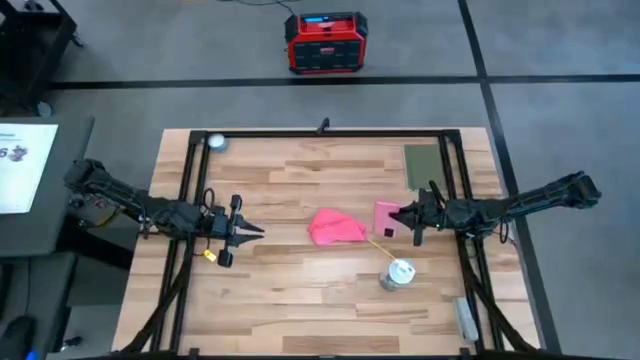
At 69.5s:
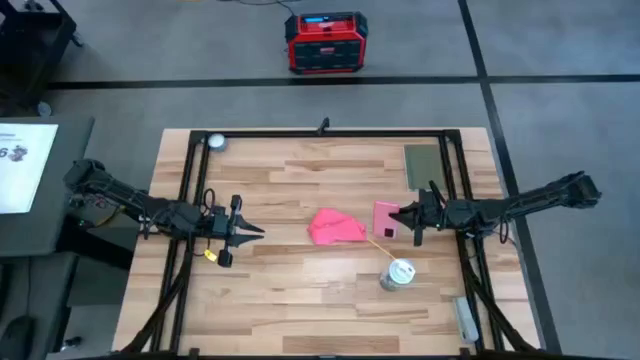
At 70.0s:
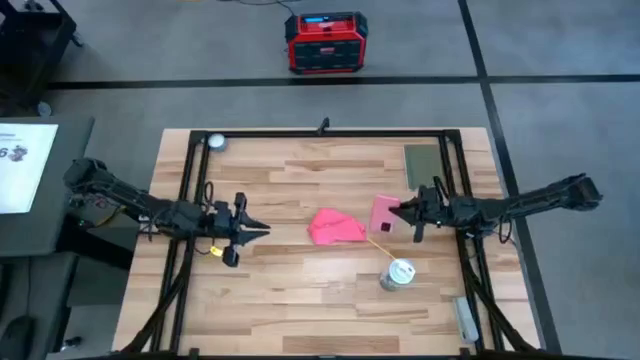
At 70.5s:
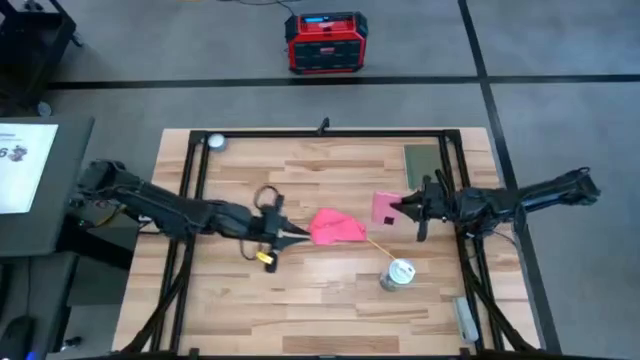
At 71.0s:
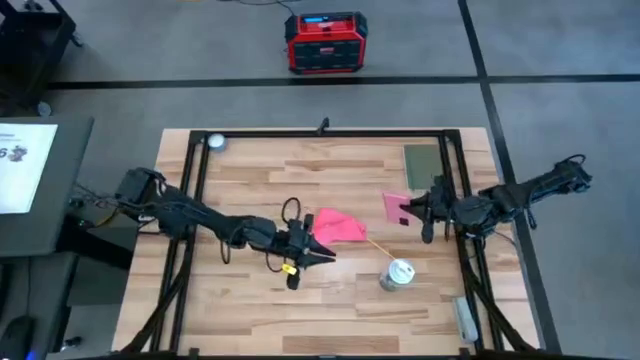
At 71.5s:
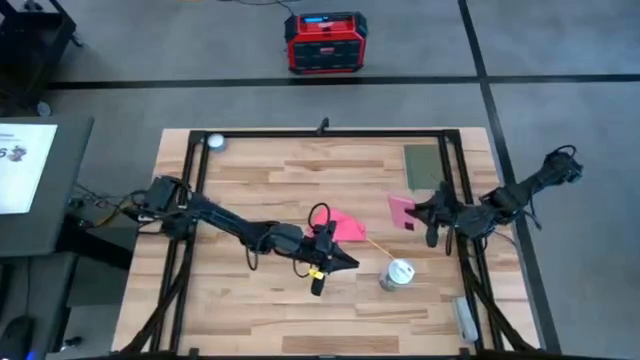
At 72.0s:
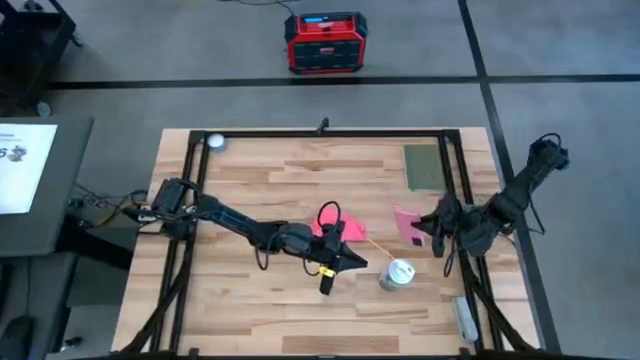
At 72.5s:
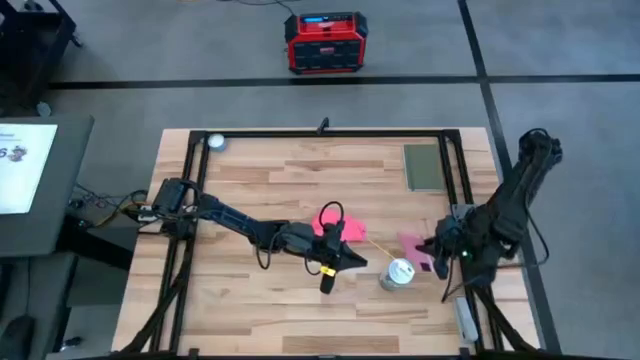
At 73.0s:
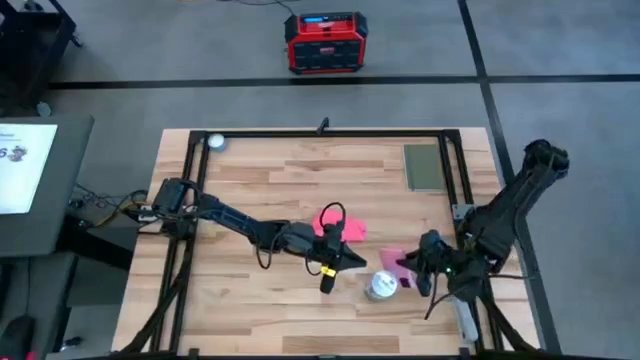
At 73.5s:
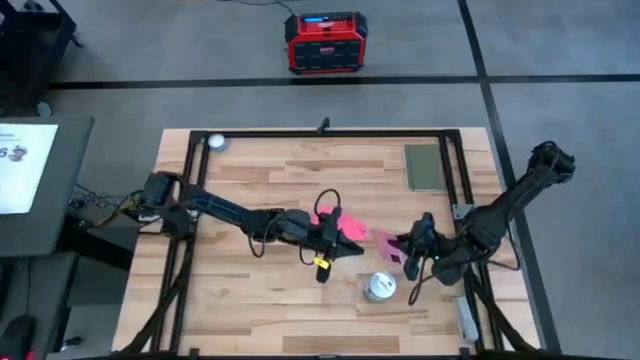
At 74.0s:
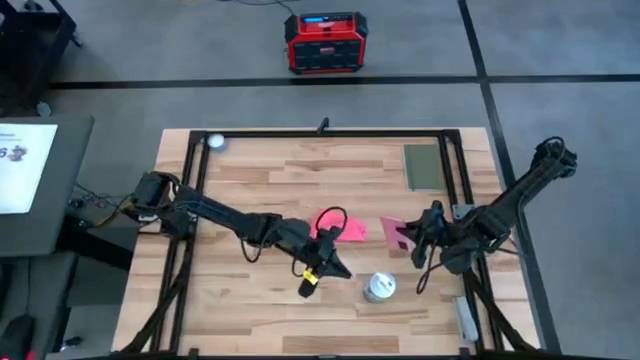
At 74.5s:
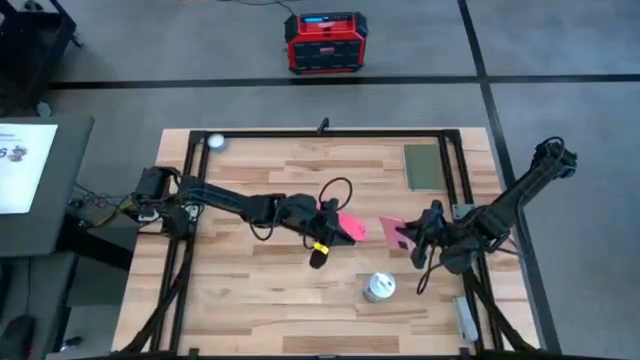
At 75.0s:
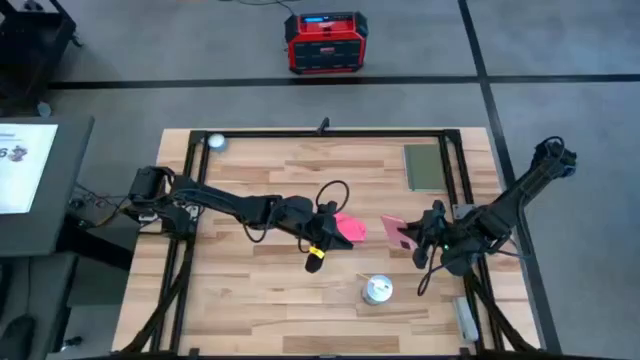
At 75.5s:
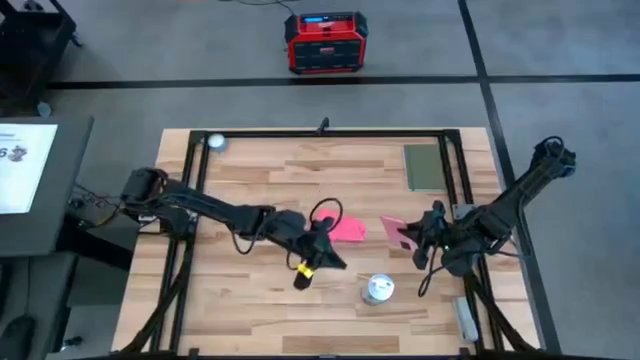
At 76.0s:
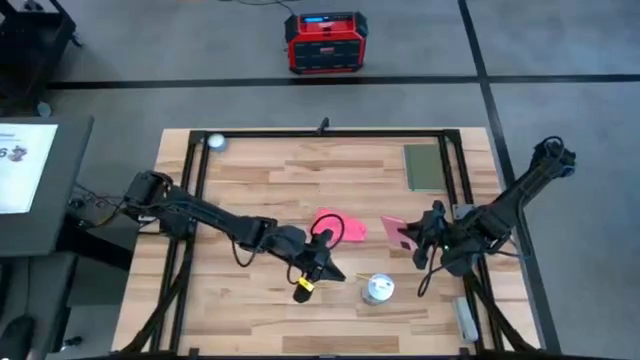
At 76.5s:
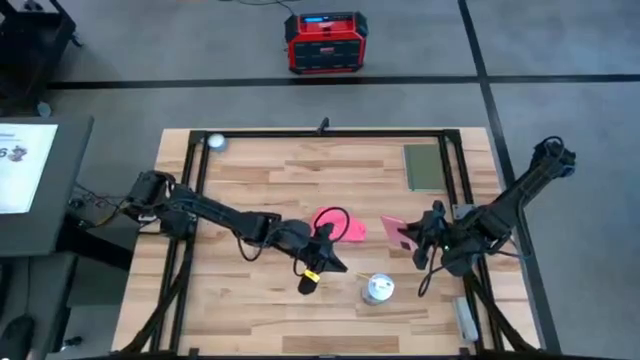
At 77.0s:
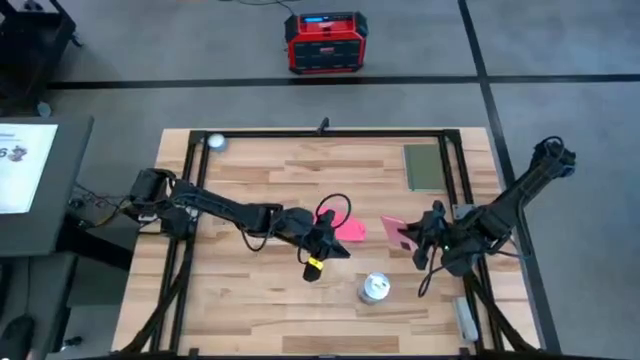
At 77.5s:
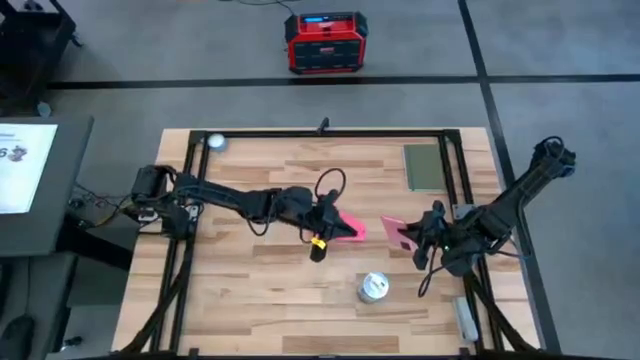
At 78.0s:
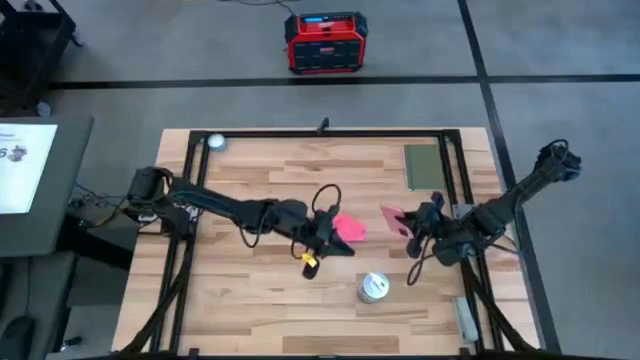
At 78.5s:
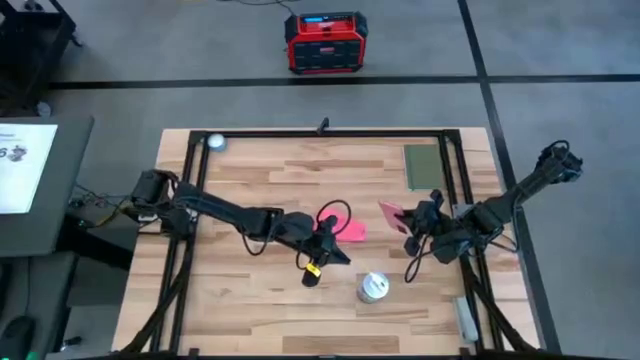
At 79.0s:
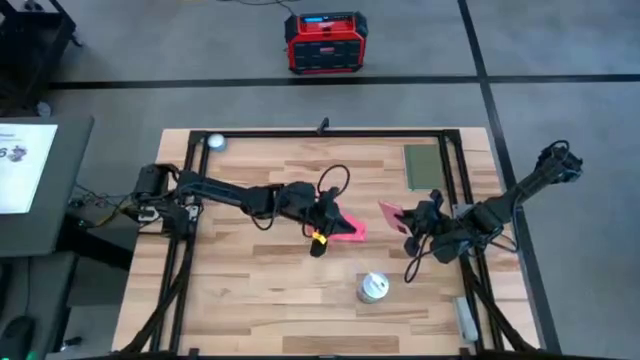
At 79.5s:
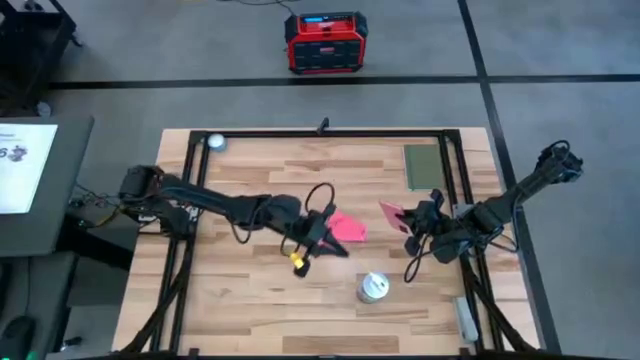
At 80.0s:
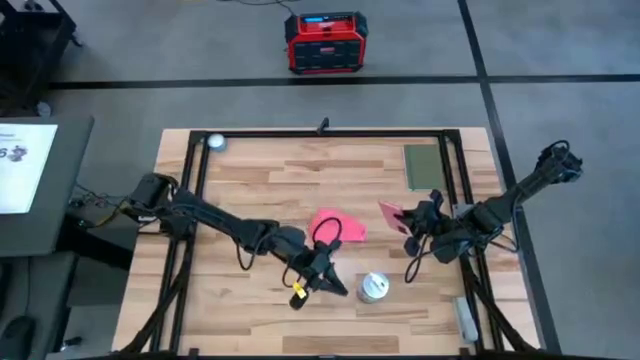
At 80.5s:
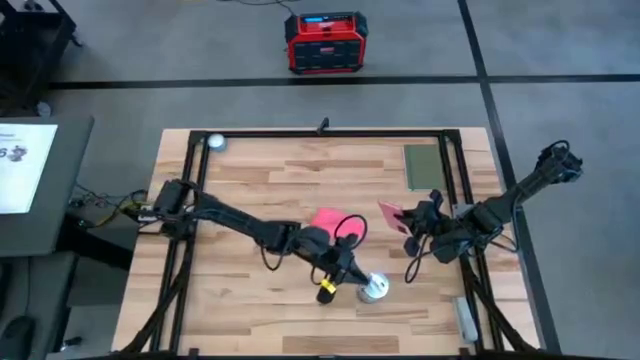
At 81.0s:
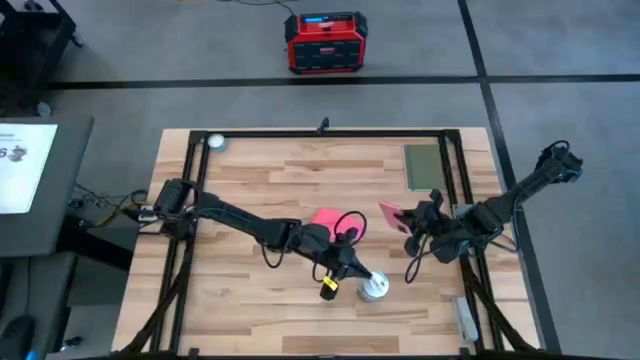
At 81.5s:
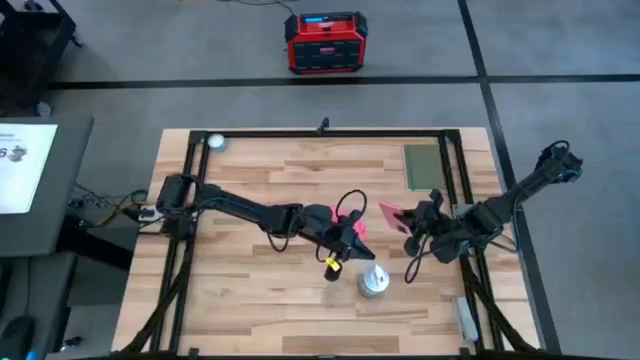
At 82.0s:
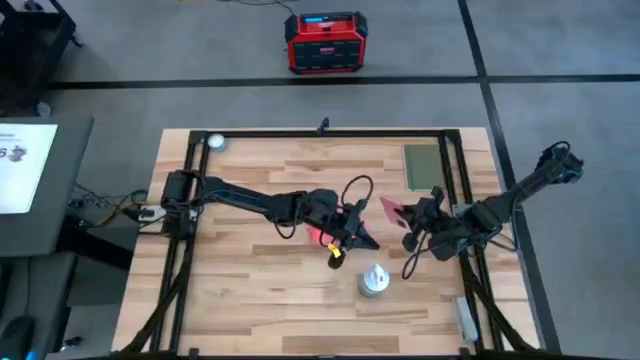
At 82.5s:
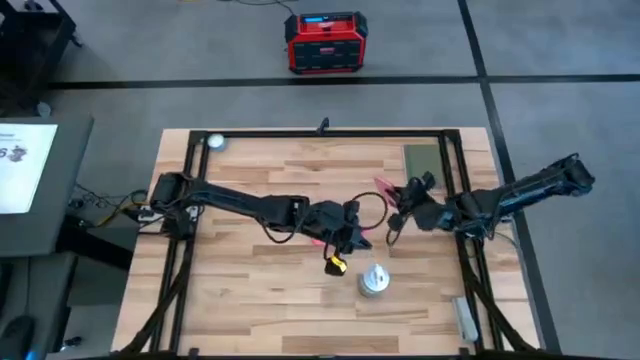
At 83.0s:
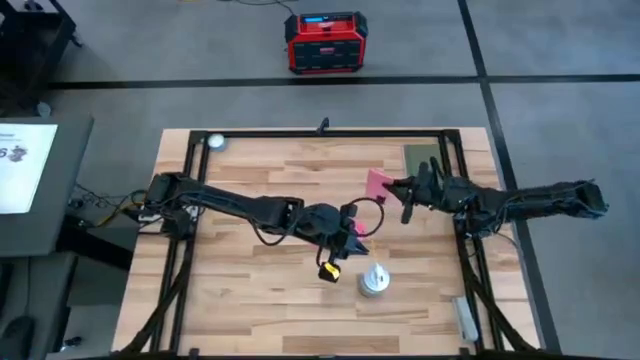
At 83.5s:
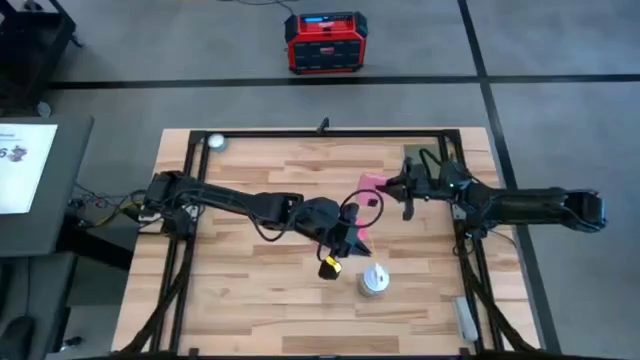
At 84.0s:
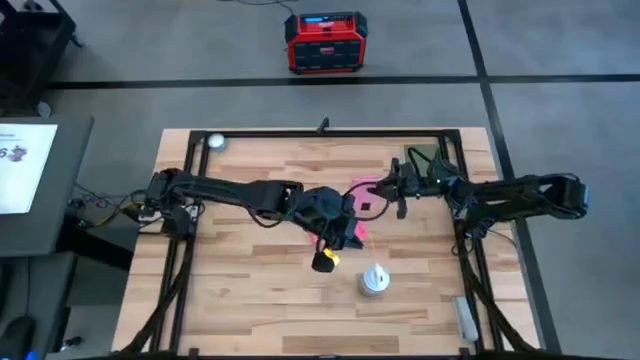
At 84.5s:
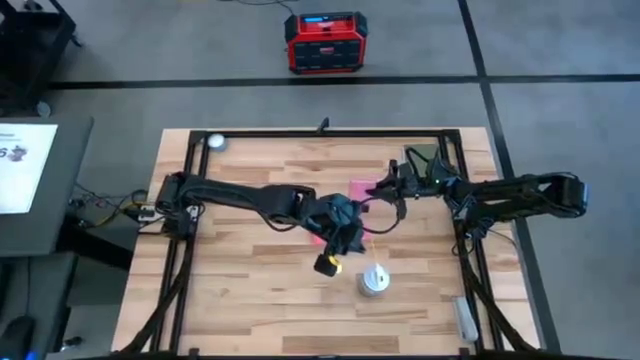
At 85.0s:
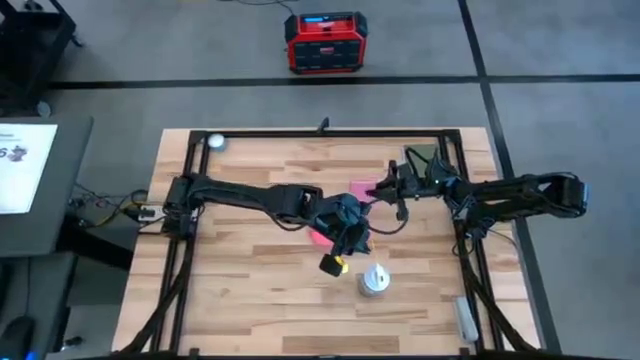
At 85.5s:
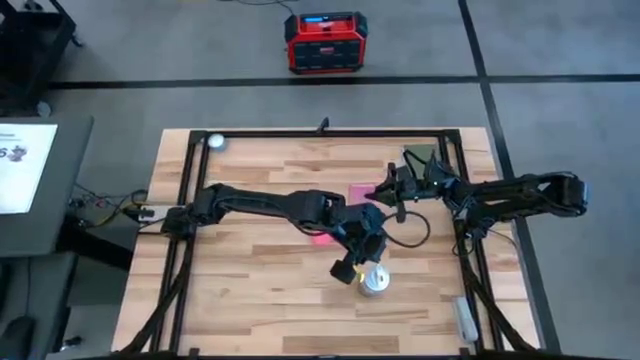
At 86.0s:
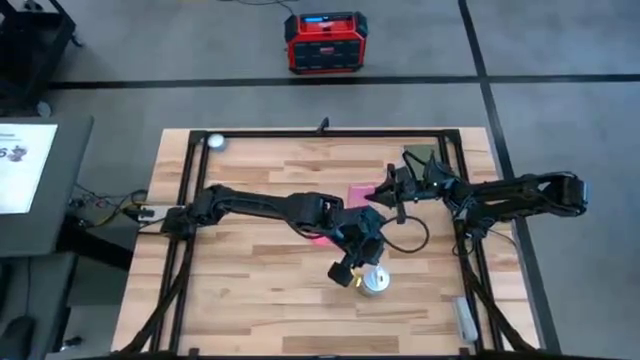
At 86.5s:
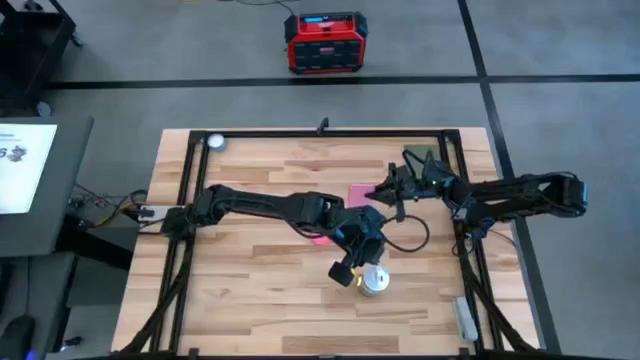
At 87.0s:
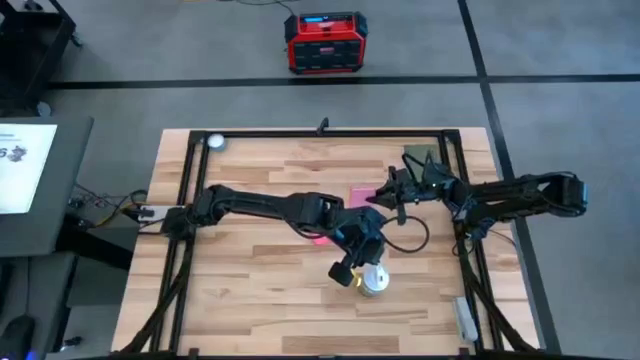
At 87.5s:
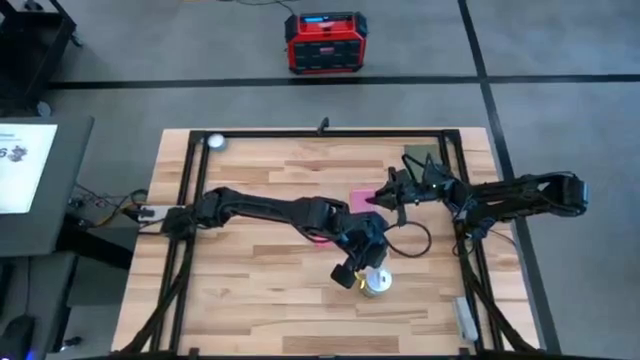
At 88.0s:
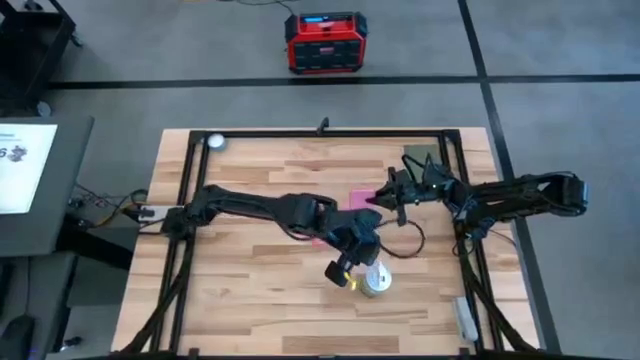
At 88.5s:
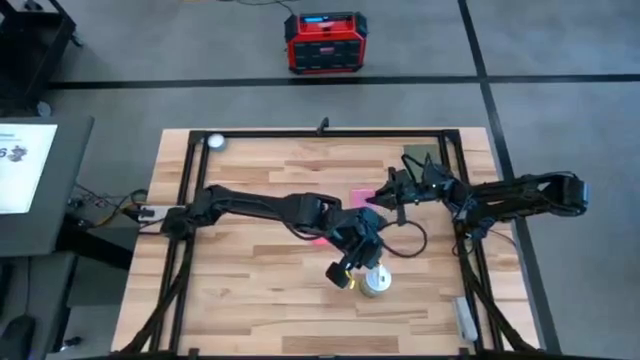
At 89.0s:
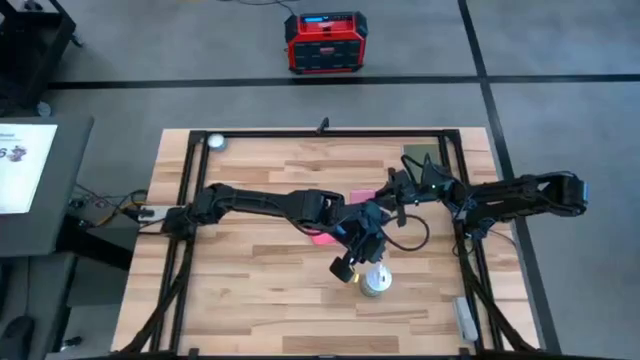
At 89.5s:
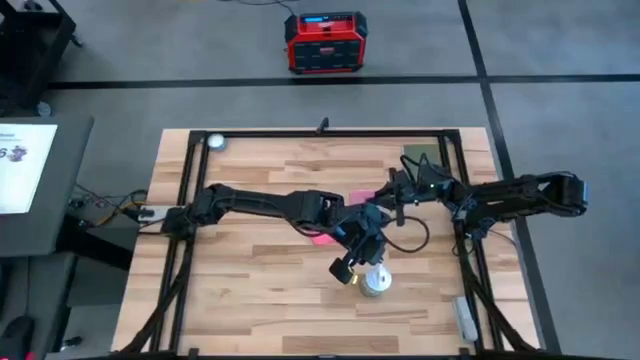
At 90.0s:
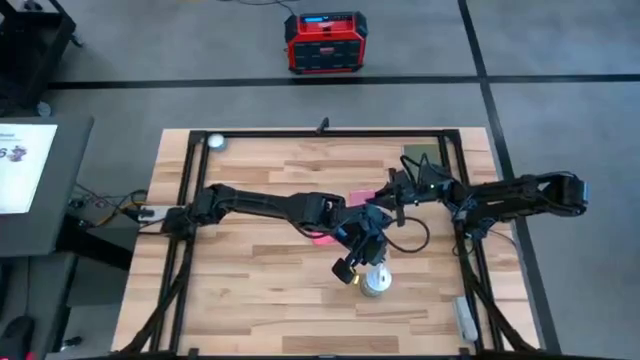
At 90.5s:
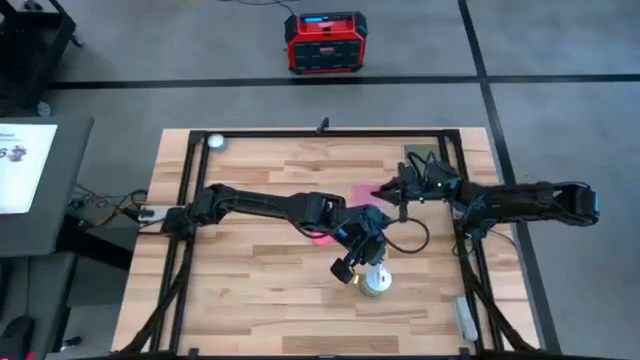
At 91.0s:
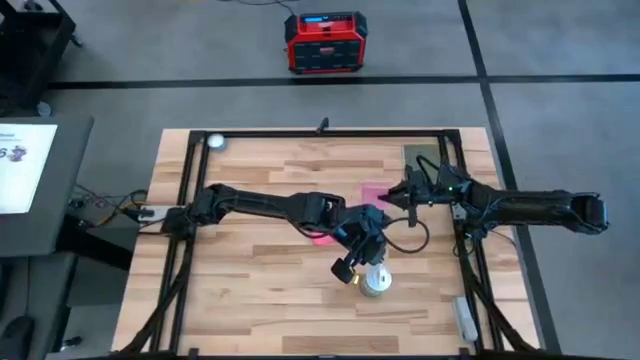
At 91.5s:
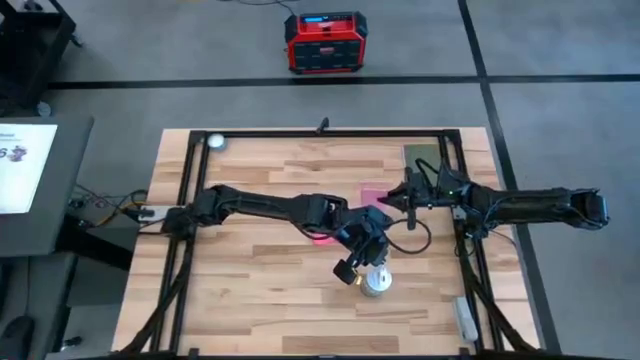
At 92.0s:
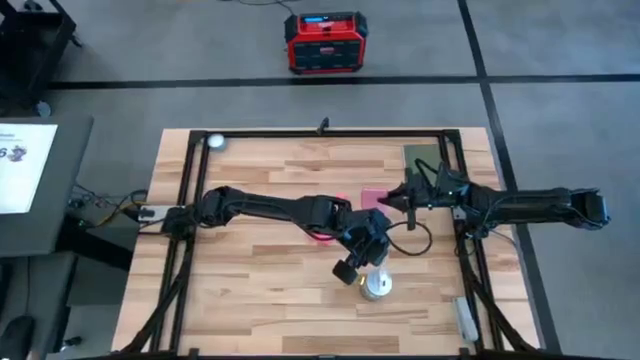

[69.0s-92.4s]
Task: Apply microfiber cloth
Spray the back of the pink phone using the spray bottle
